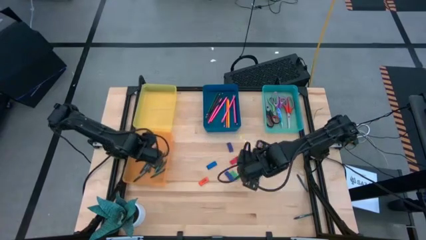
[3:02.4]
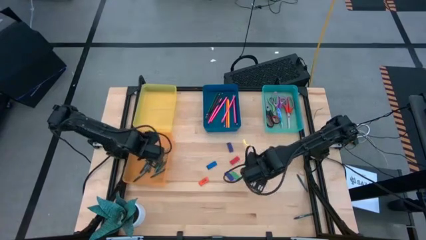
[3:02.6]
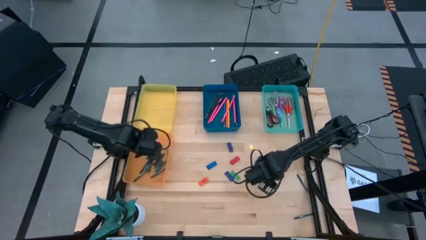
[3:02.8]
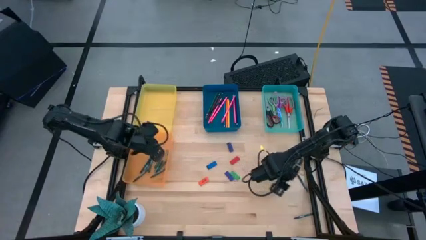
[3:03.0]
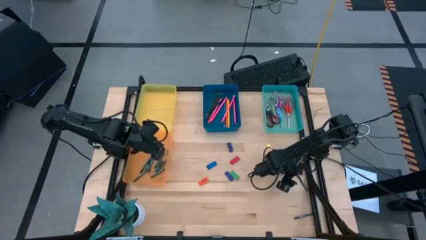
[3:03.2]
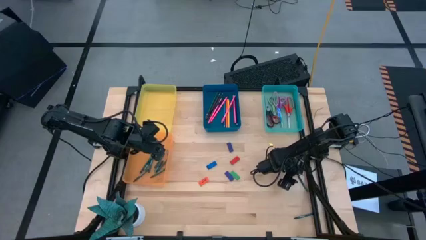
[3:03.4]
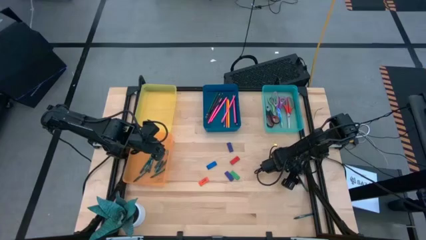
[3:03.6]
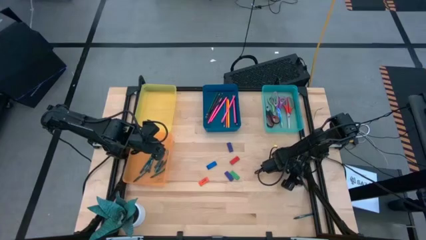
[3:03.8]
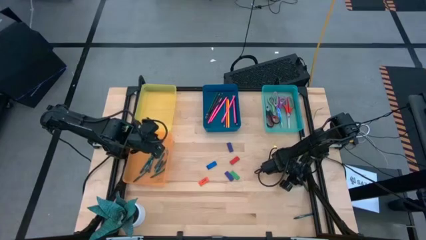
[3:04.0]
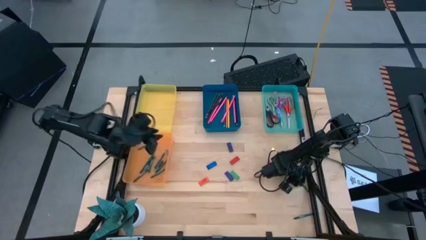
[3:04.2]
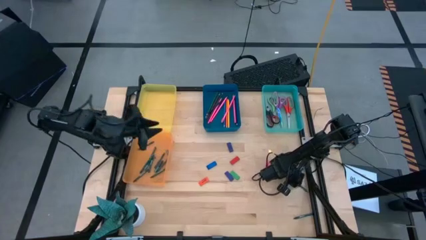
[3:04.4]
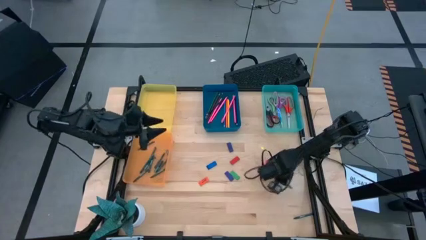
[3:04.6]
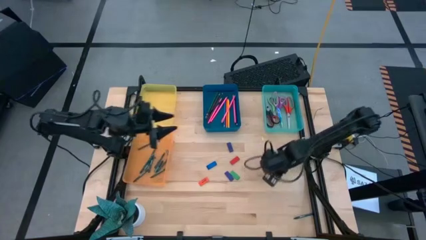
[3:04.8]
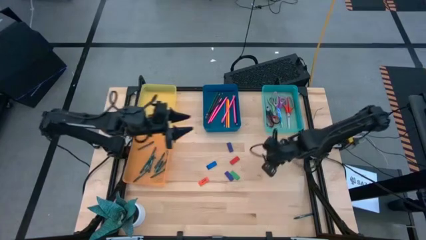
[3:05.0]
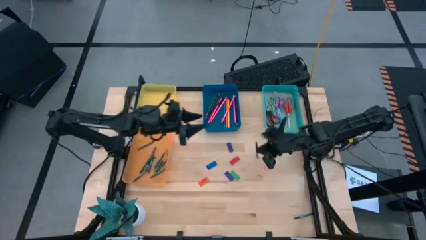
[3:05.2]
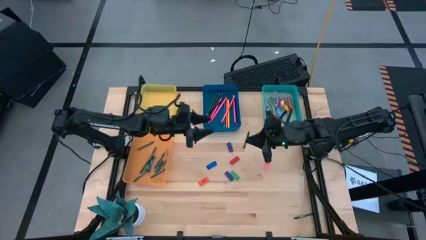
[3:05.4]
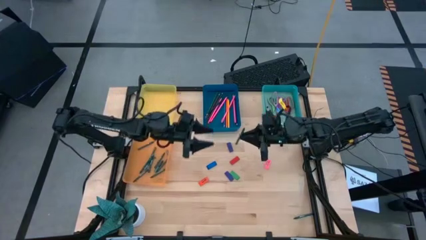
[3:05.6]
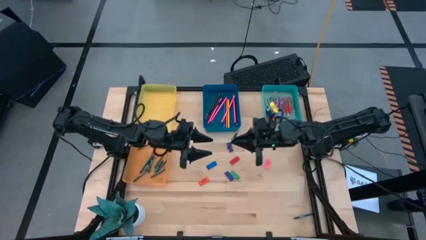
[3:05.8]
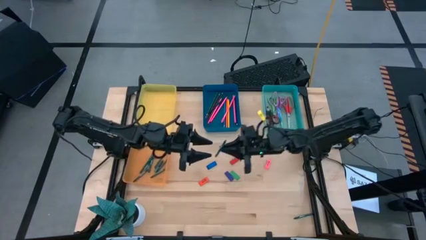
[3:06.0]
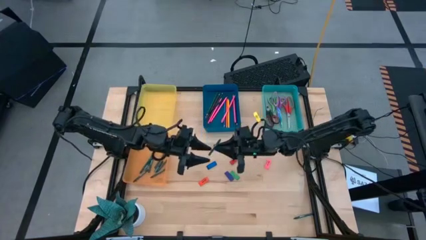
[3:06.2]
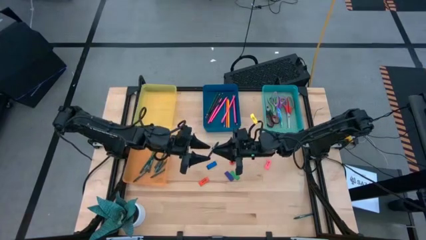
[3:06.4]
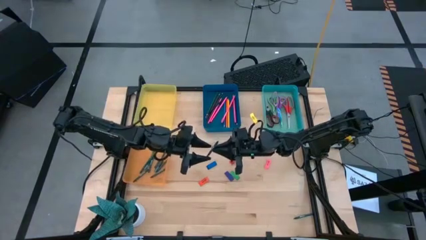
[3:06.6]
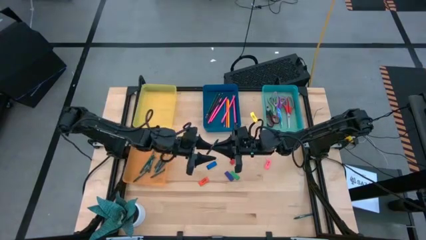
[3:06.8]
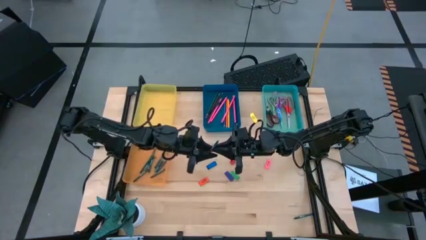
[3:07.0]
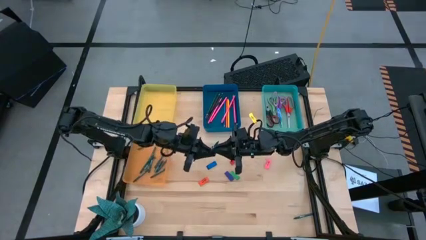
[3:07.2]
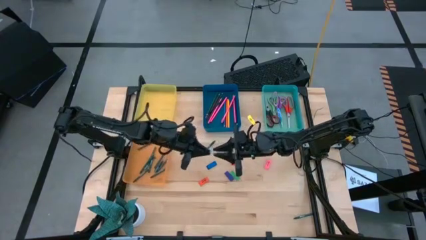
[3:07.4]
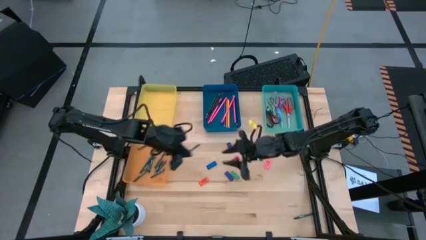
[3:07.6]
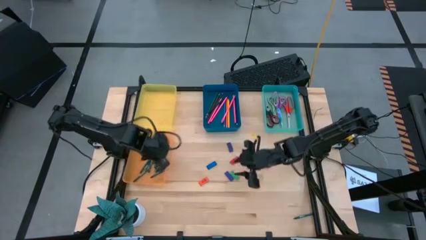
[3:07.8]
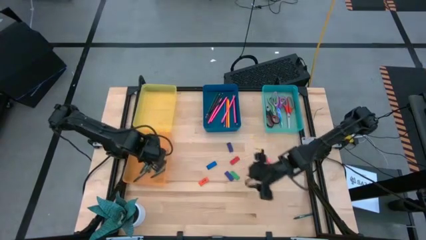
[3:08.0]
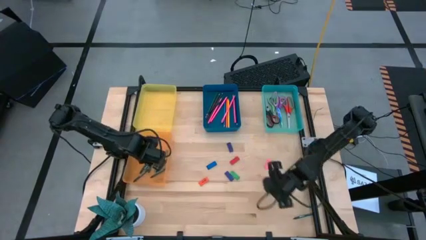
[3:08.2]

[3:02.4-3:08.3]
Task: Sort crayons/erasers/pens/pencils in bins
Put the top green crayon into the orange bin

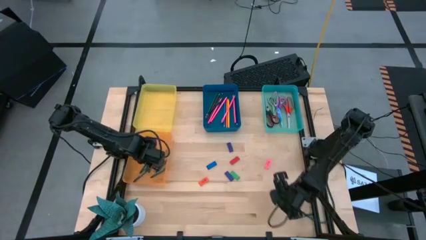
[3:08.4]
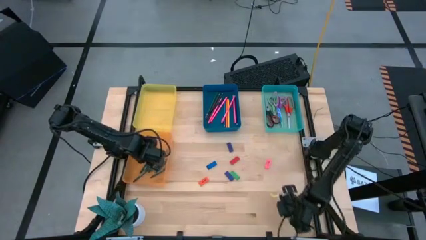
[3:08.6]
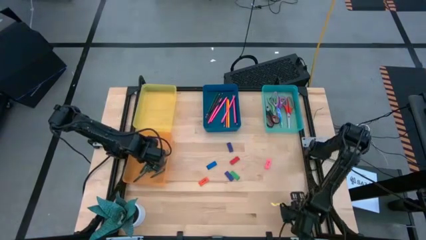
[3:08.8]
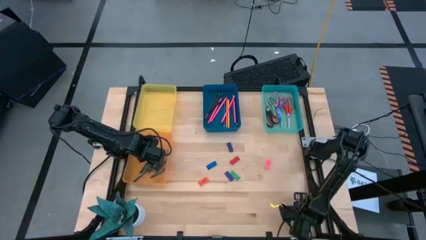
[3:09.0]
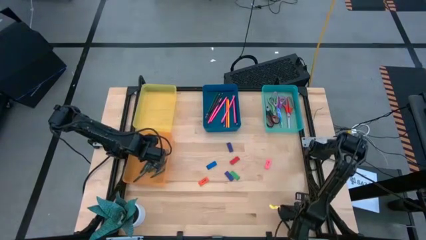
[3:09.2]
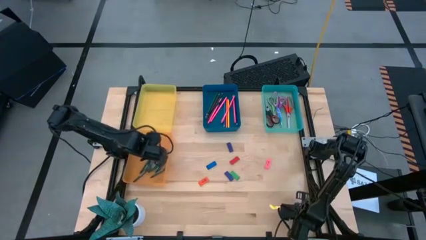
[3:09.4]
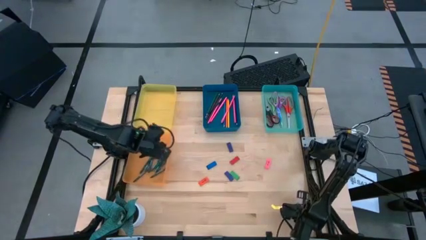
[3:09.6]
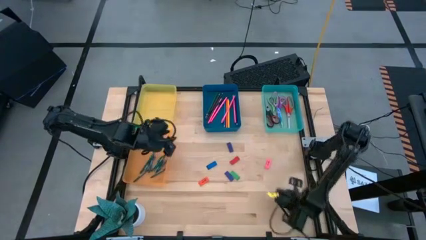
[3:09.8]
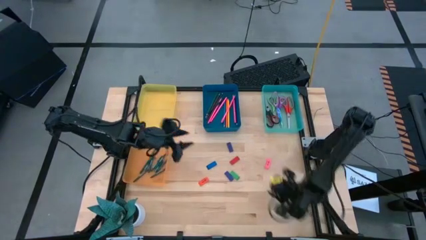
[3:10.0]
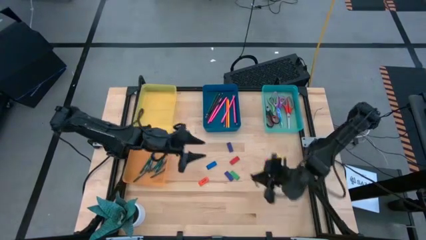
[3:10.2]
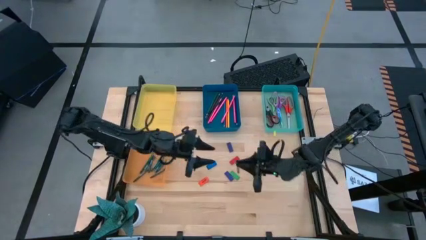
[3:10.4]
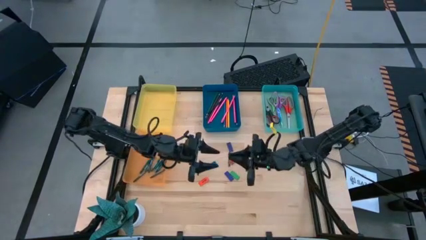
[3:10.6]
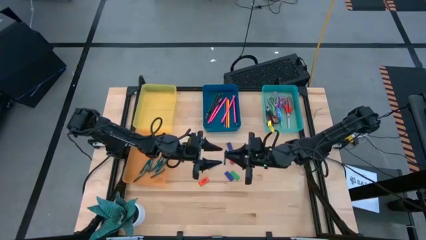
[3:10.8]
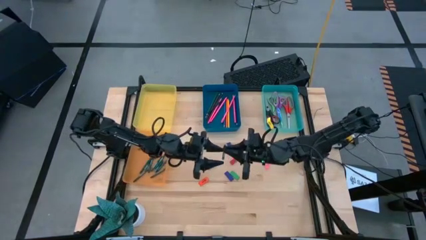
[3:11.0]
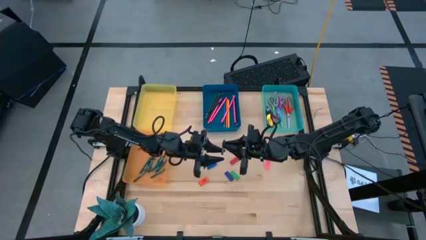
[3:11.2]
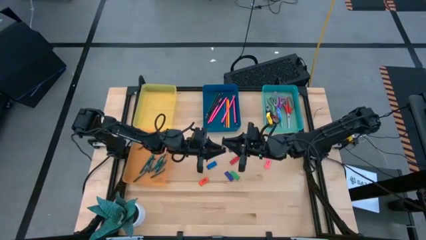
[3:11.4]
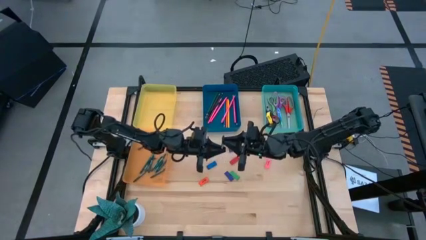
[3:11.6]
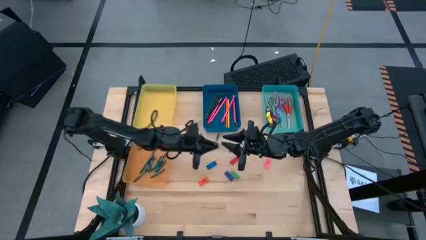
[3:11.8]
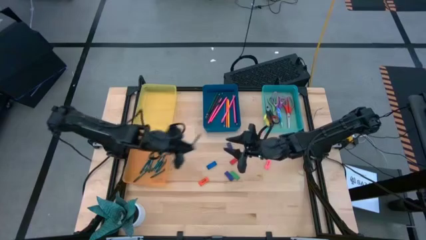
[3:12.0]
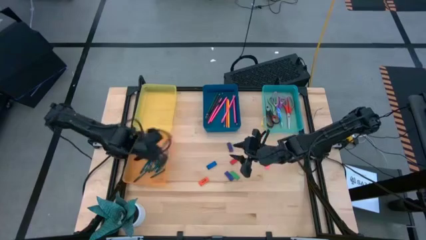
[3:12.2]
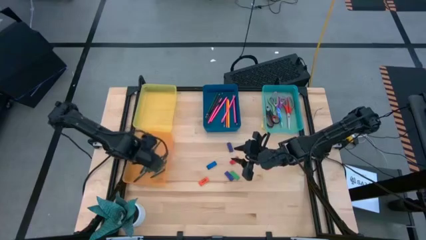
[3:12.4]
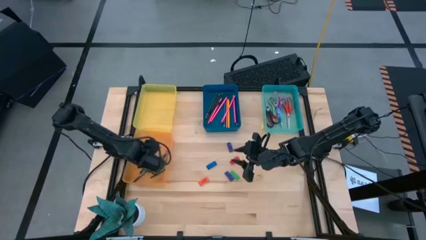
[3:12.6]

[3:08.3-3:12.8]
Put the green crayon into the orange bin

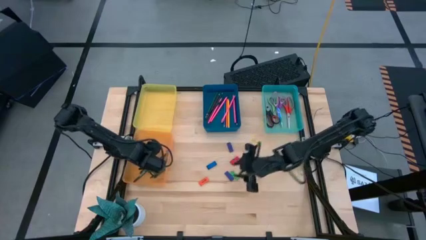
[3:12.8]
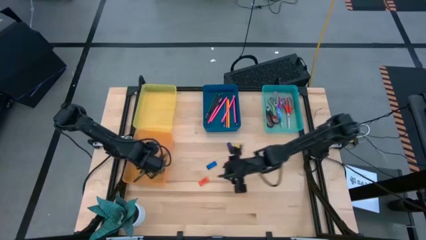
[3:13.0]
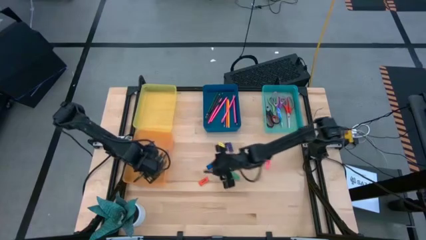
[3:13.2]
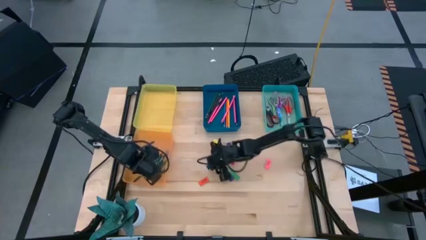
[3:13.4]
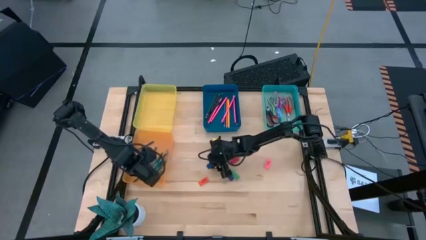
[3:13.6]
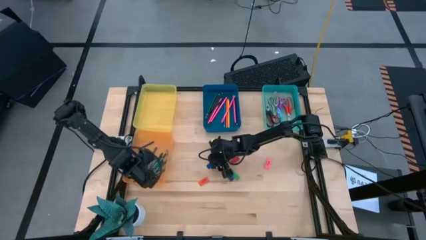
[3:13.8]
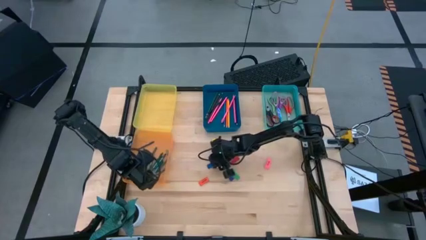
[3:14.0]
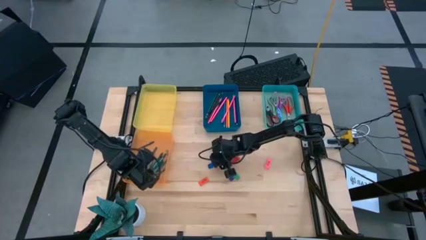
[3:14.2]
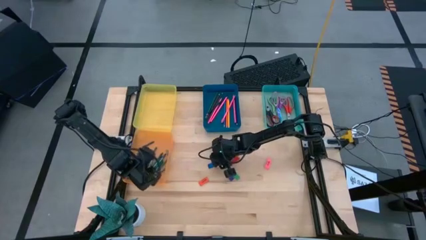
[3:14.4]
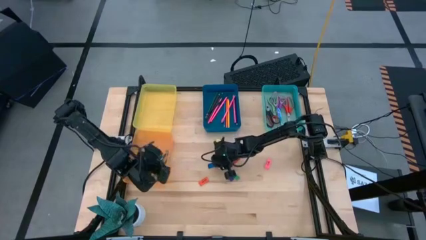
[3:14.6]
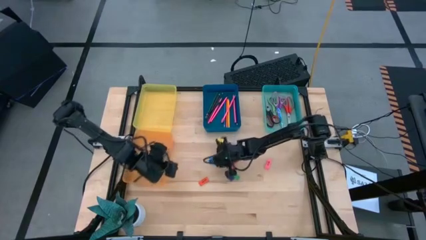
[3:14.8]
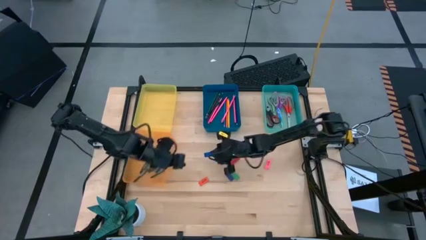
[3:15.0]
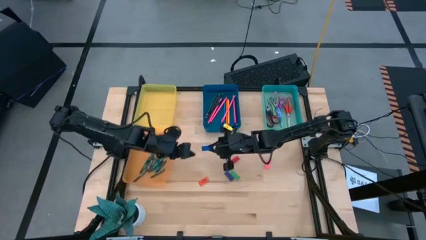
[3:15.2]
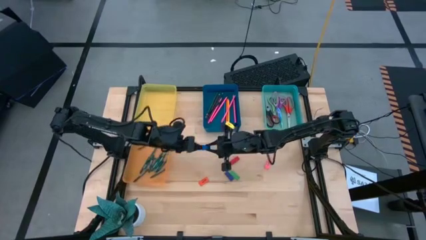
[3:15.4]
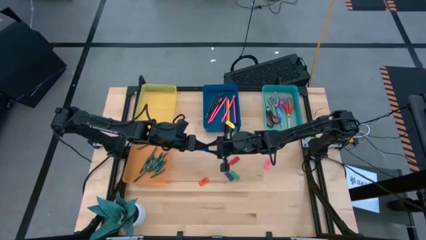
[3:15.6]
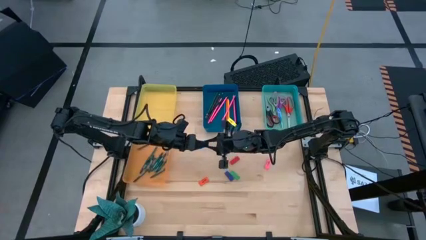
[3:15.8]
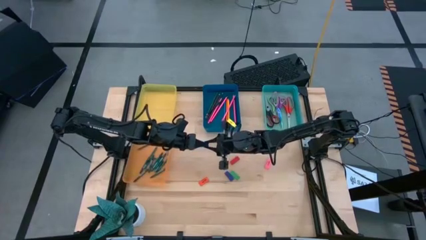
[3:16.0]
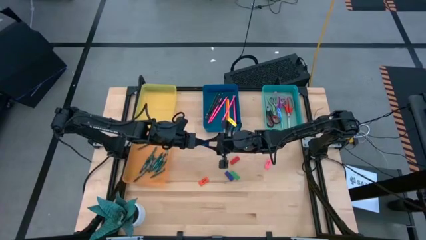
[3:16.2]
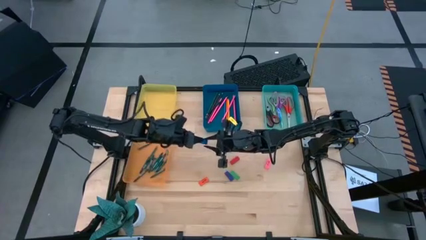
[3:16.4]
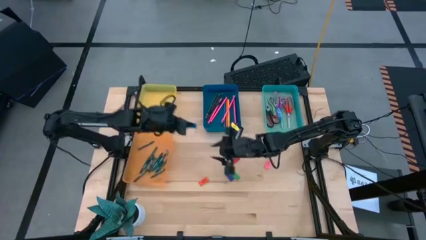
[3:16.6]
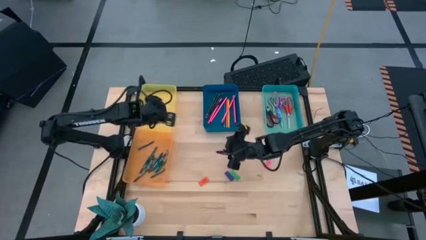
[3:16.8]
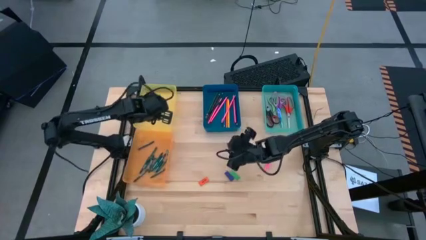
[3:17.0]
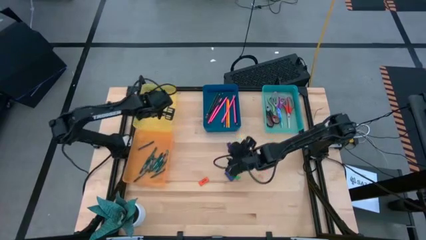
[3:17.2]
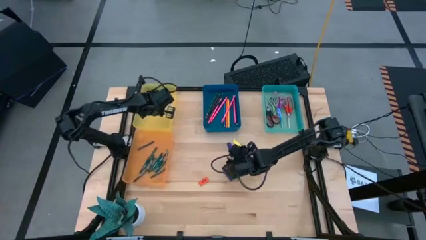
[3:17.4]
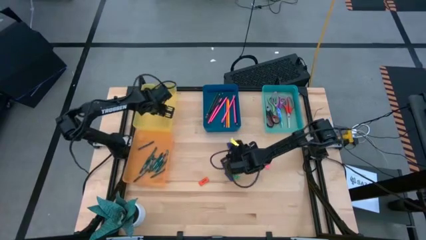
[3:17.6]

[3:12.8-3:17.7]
Put the blue eraser into the yellow bin

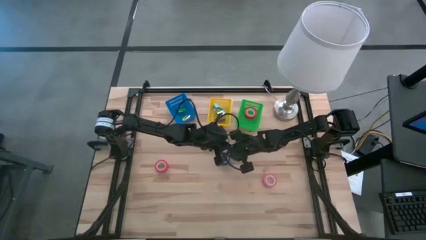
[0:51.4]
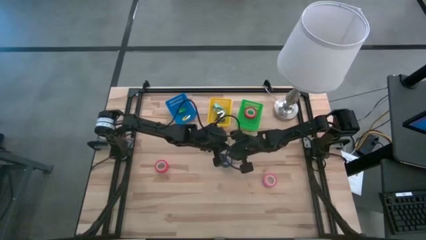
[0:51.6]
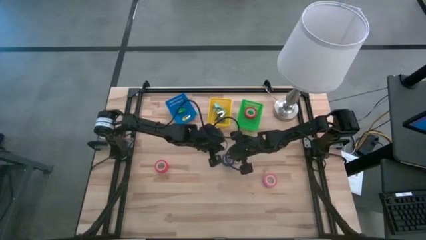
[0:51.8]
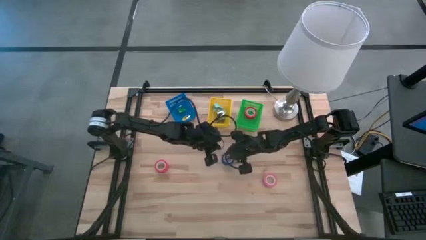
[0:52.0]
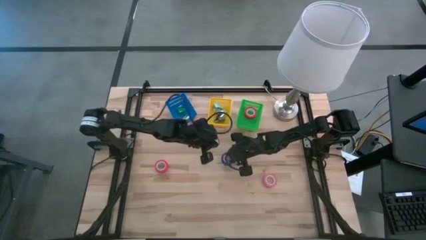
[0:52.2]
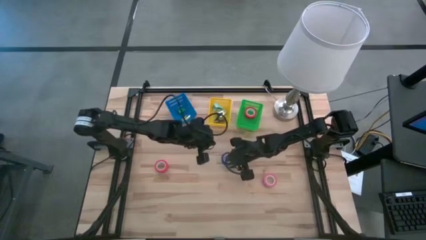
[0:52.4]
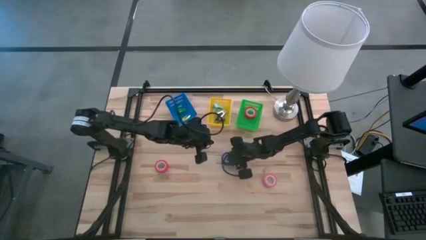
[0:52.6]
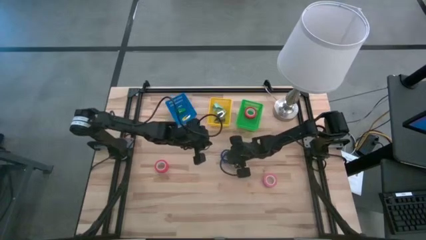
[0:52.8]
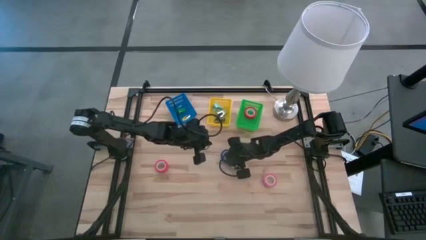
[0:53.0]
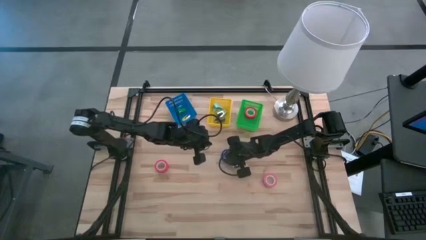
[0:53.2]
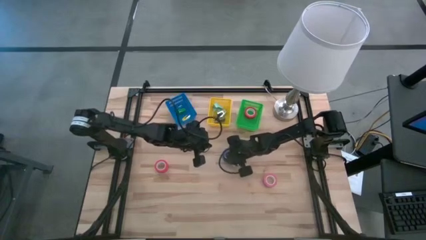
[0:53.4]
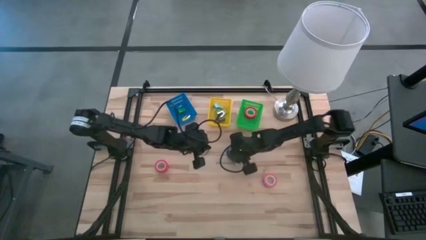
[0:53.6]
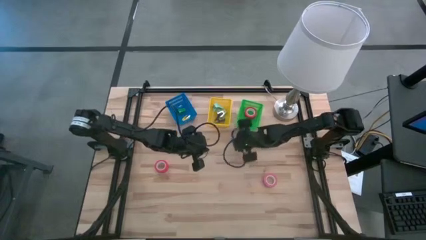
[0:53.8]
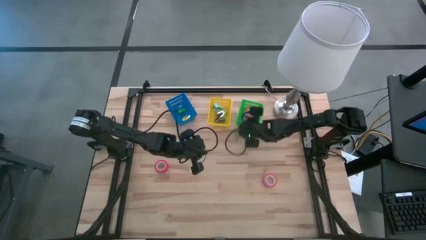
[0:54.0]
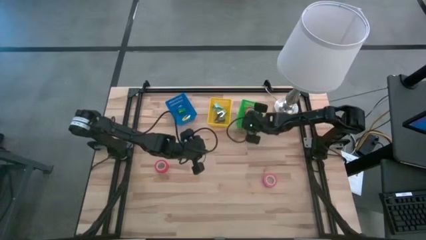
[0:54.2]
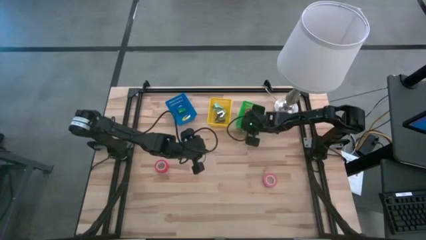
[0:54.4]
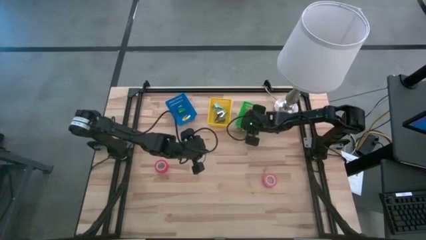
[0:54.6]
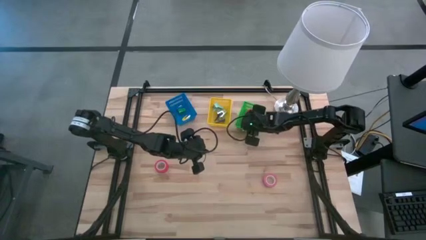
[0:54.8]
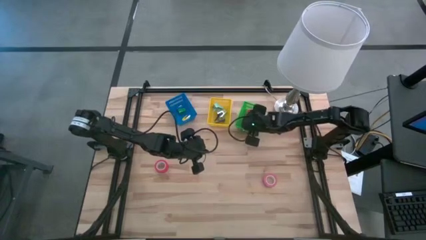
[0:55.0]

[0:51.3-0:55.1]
Task: Pick and place Stapler, Stapler remover, tape
Put the blue tape into the green bin
